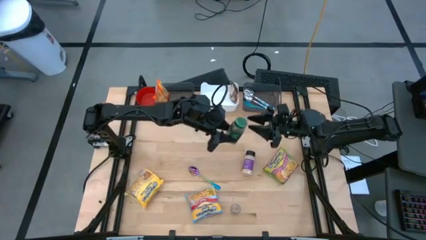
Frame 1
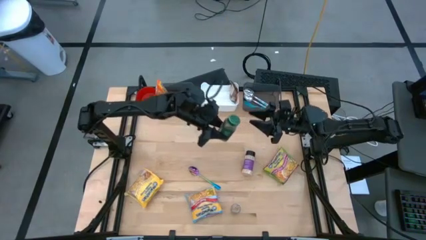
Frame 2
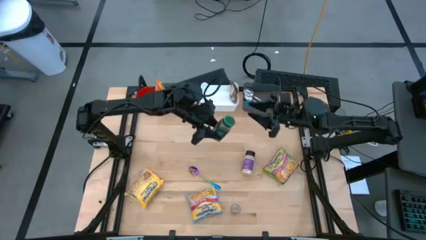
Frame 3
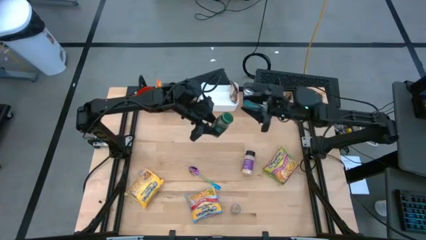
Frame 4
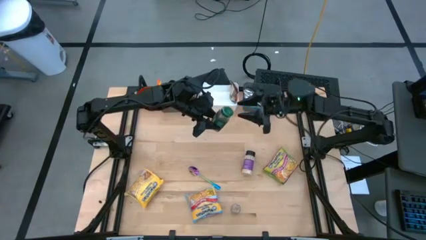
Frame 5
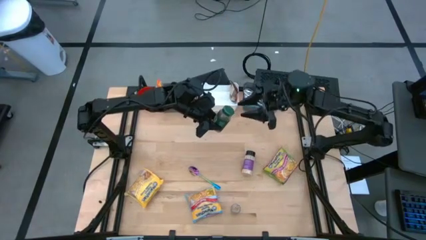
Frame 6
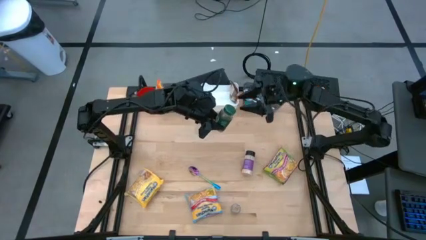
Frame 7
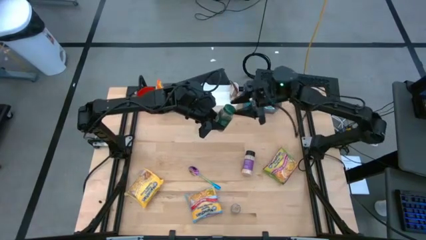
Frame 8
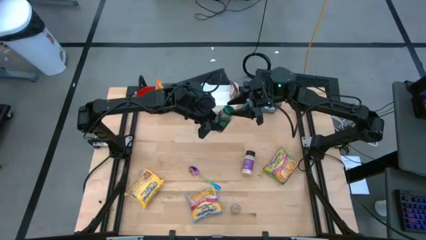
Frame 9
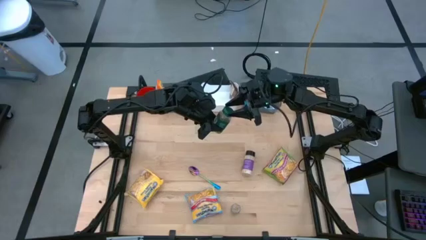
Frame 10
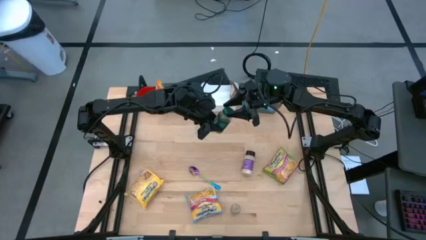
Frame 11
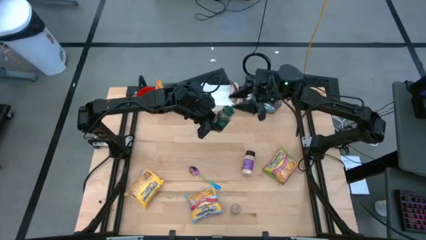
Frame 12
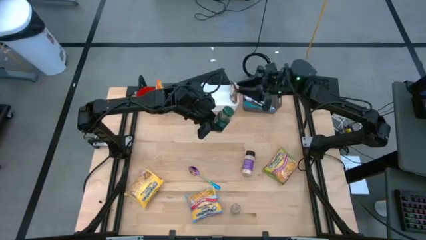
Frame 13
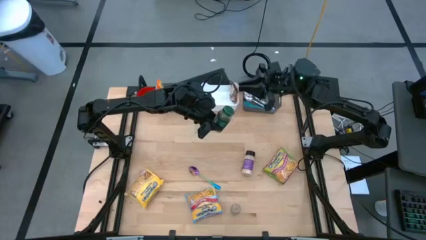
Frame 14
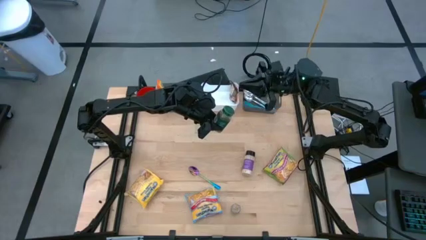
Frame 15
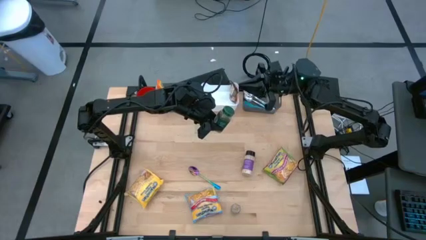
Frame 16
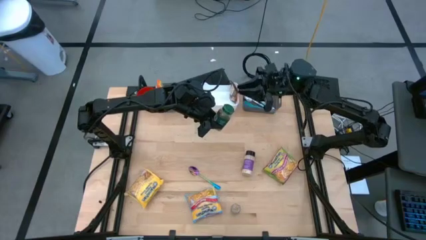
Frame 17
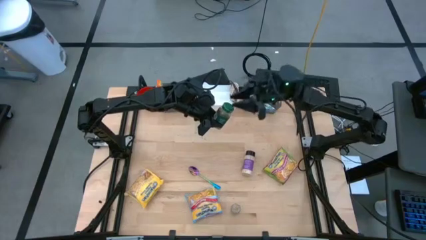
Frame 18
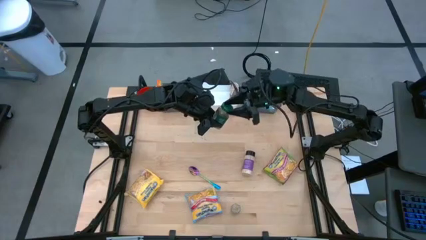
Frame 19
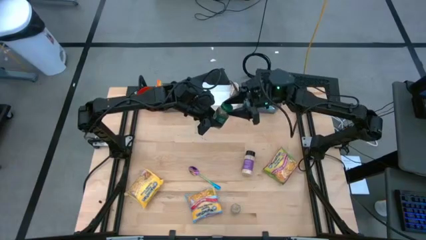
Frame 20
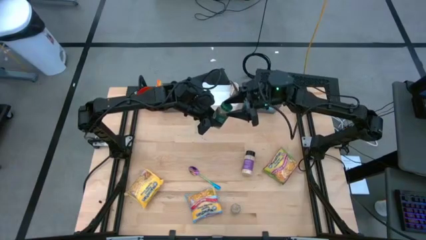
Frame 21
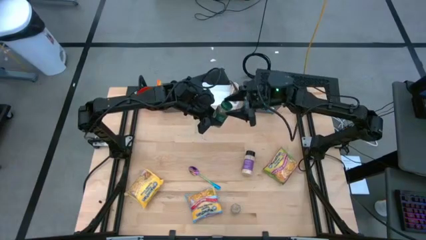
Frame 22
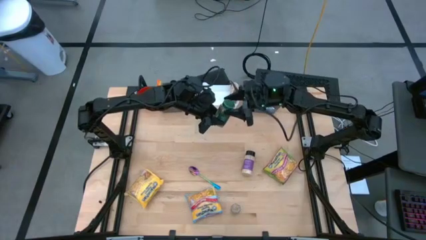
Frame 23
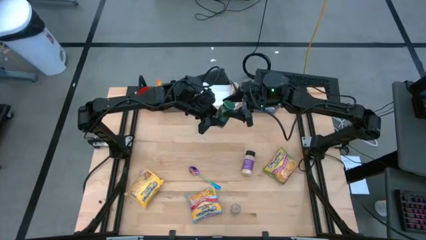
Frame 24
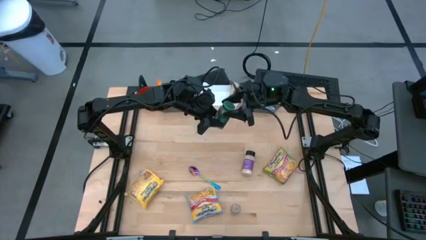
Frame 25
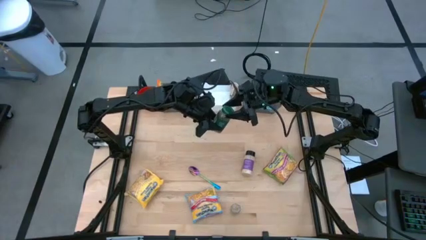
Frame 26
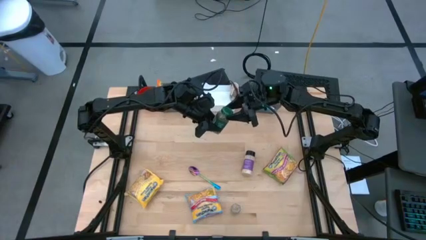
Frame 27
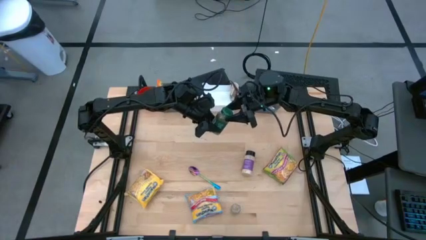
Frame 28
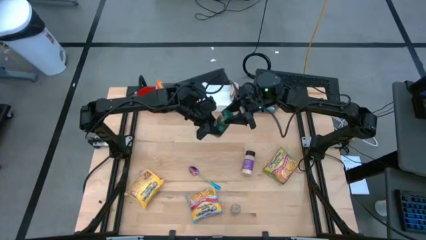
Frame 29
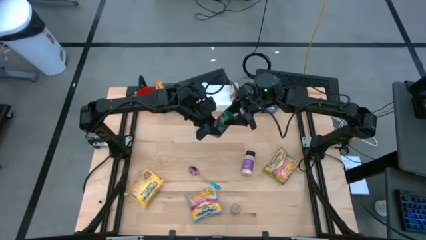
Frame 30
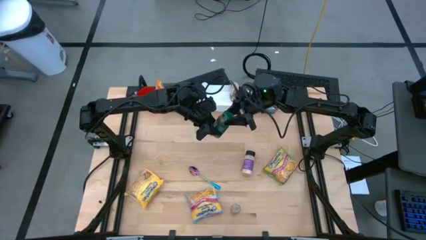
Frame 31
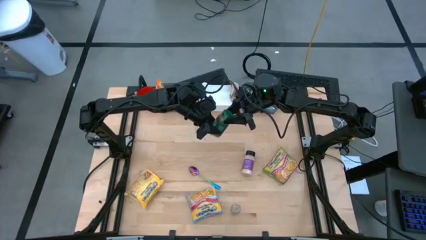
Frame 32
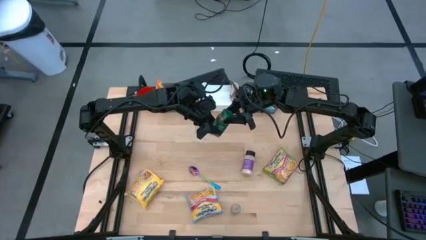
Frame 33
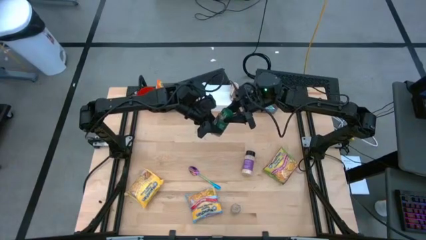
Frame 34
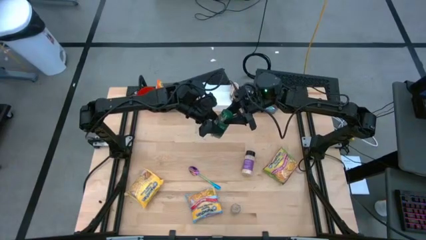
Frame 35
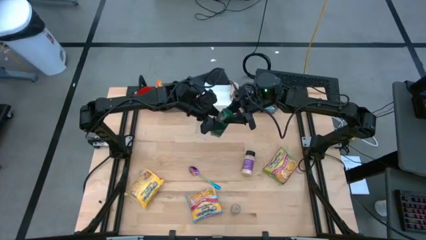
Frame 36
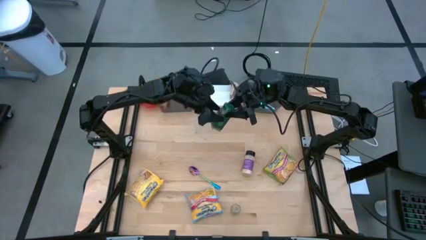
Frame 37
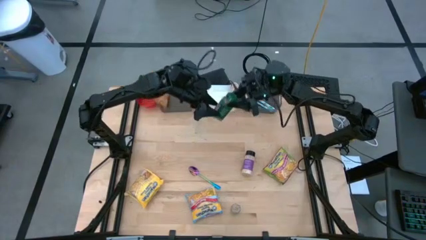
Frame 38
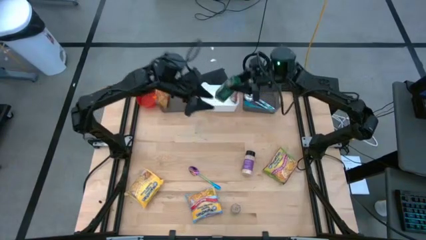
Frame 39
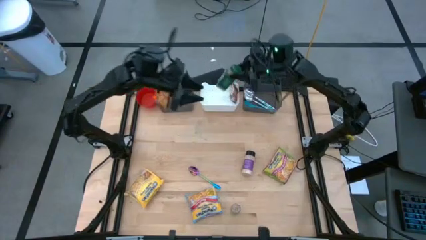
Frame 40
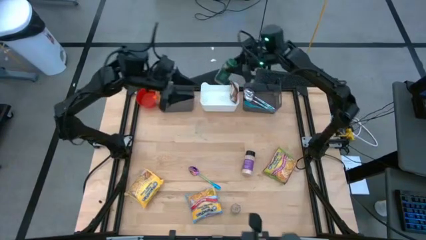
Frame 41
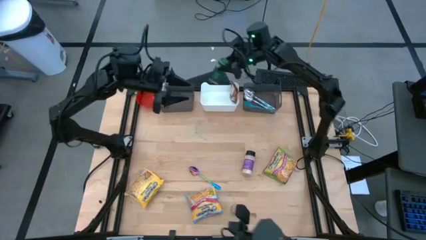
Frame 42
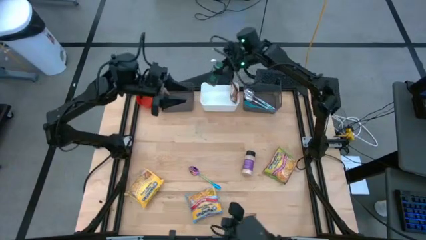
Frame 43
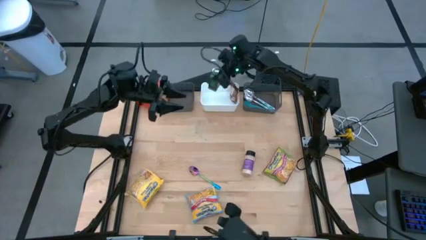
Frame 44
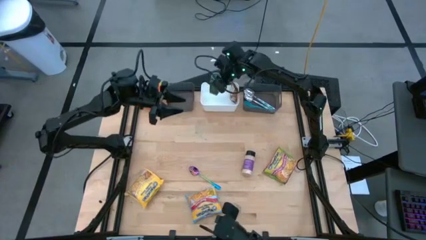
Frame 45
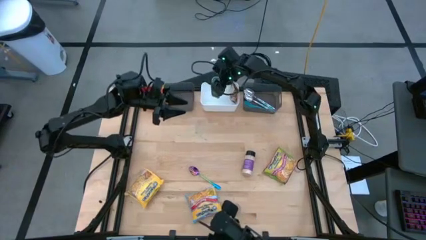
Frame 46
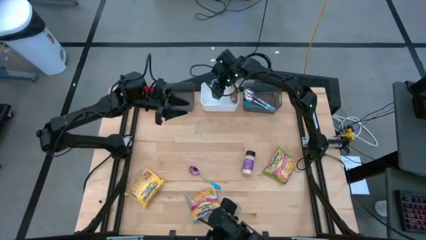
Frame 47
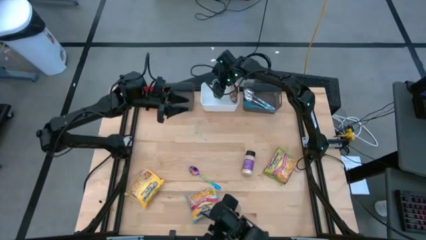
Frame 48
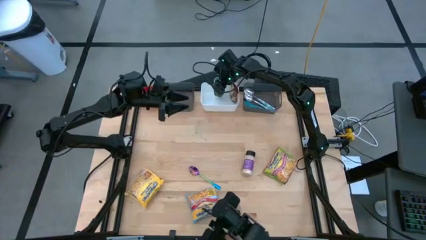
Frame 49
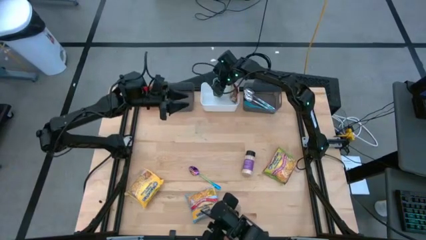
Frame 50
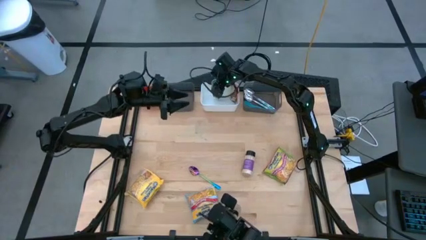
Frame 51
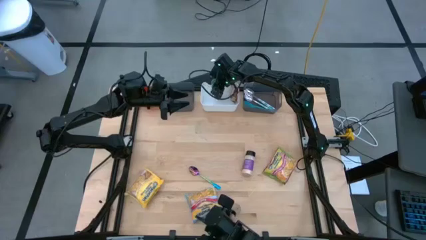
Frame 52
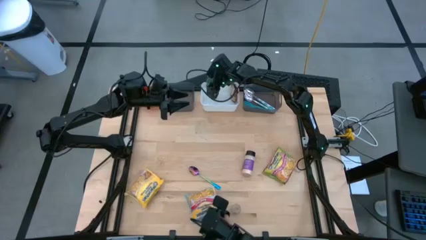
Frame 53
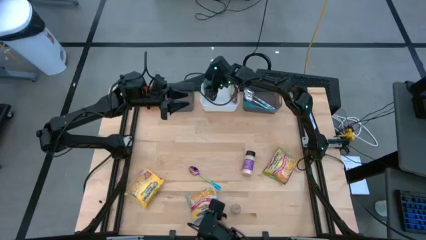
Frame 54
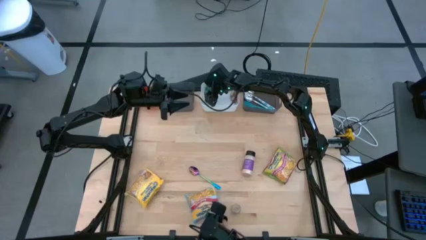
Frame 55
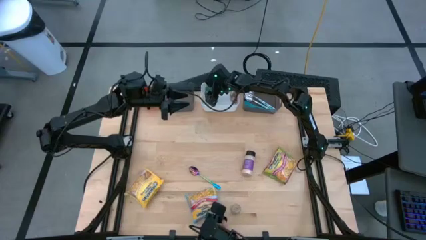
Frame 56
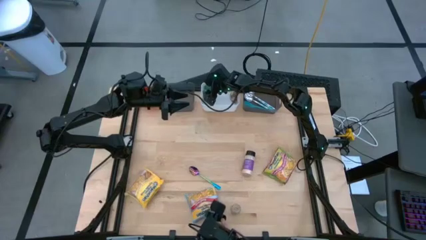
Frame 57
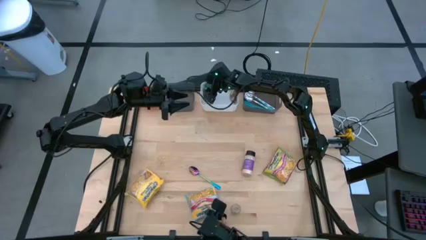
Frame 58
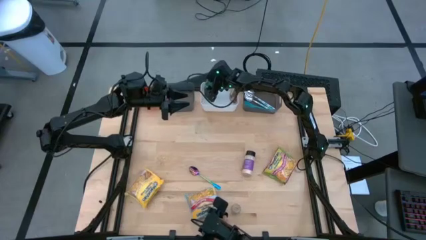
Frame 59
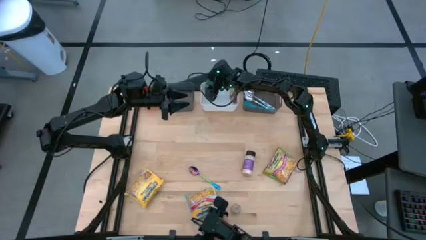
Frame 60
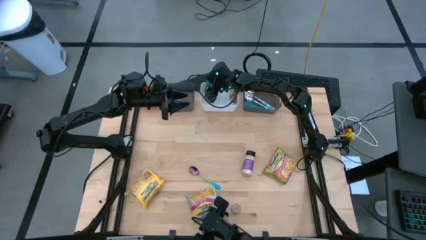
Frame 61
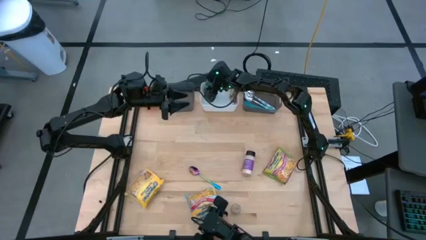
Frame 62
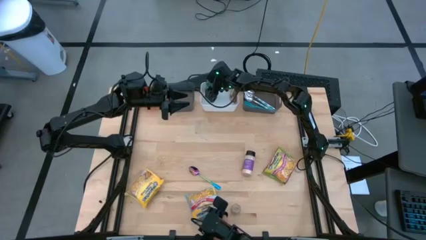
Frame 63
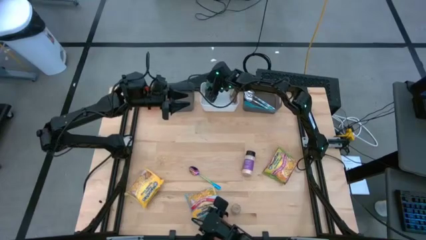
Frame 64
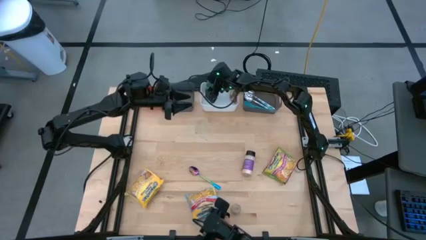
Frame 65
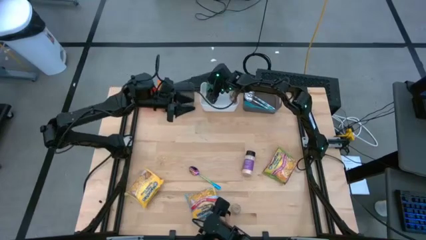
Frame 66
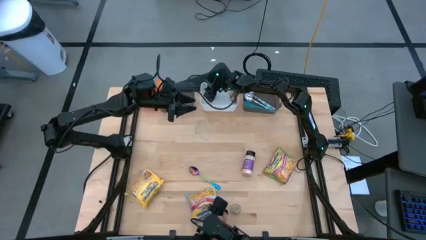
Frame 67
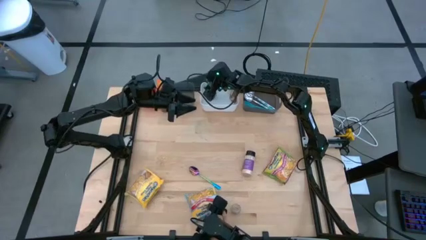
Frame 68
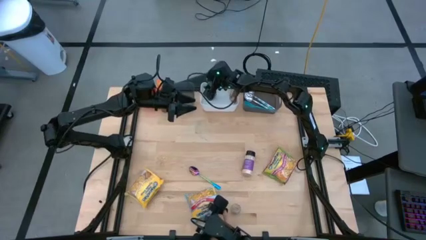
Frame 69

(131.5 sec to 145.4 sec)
Task: Pick & Place Food Item
Put the green seasoning bottle into the white bin
